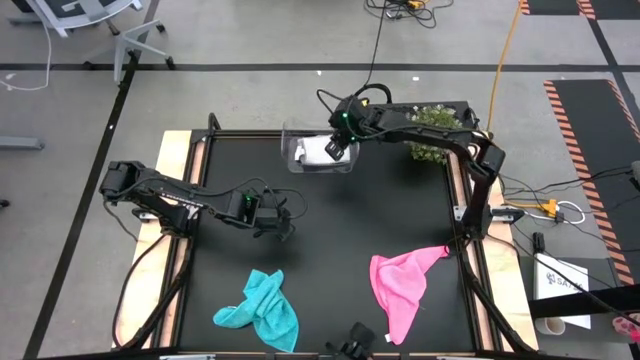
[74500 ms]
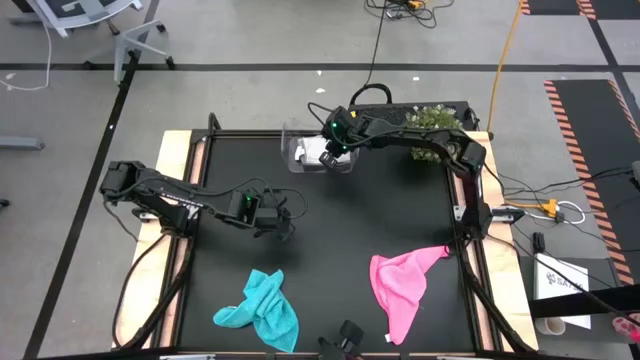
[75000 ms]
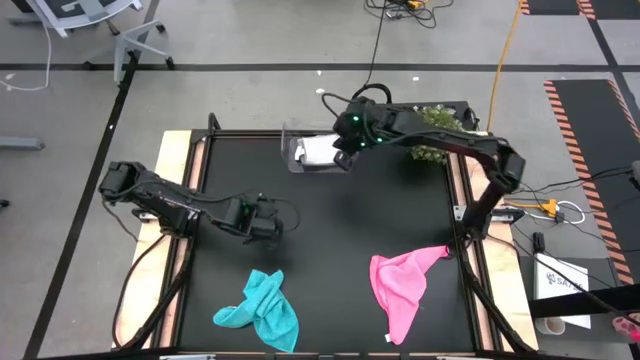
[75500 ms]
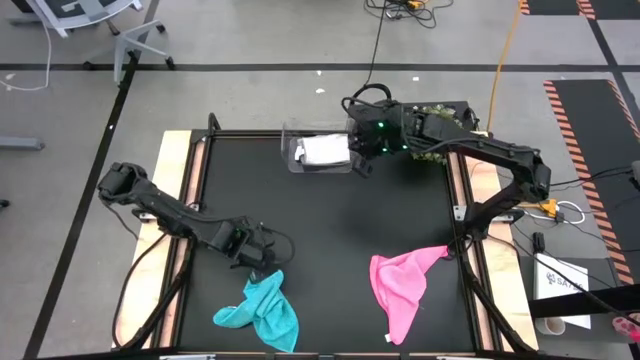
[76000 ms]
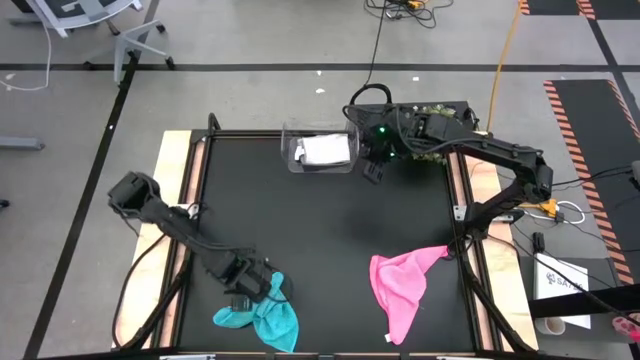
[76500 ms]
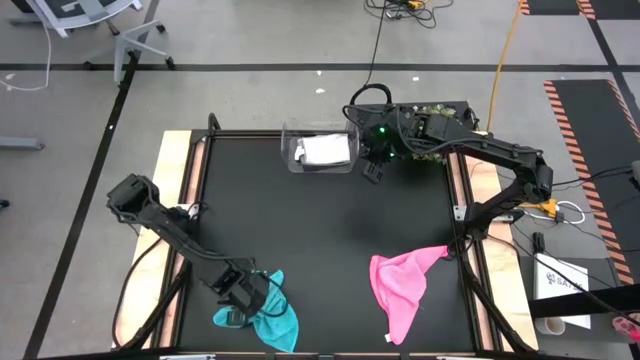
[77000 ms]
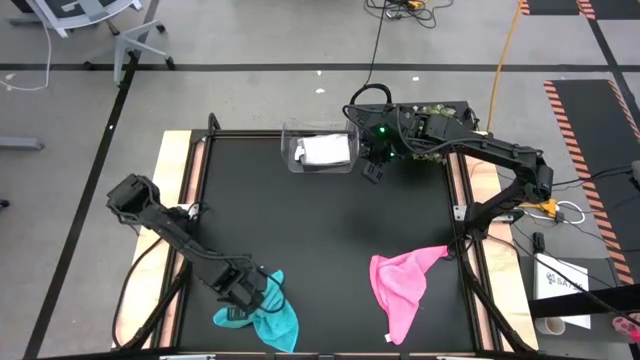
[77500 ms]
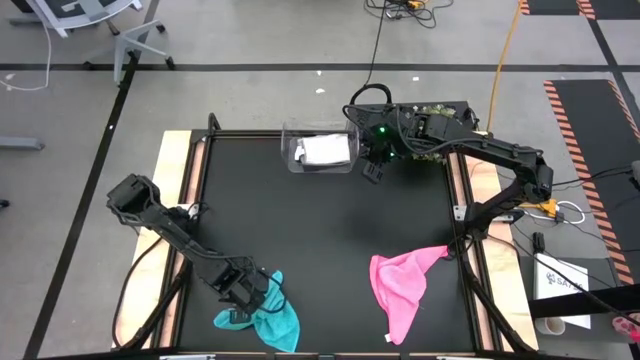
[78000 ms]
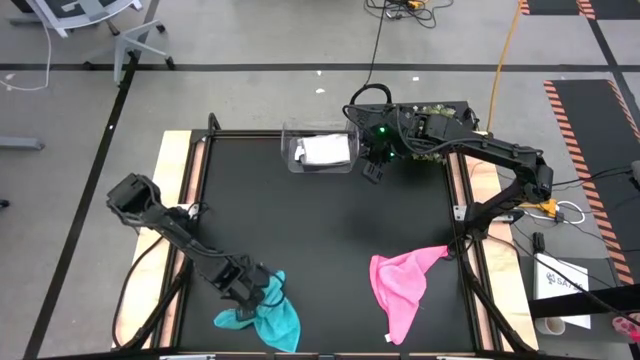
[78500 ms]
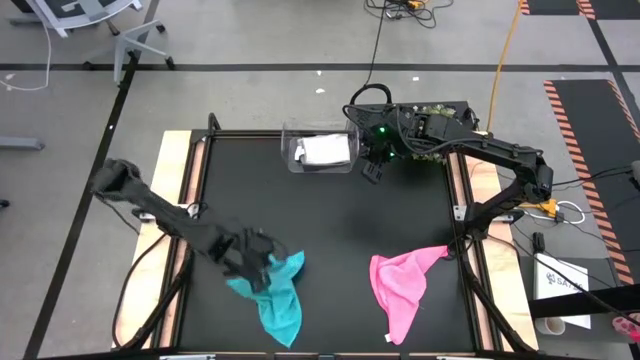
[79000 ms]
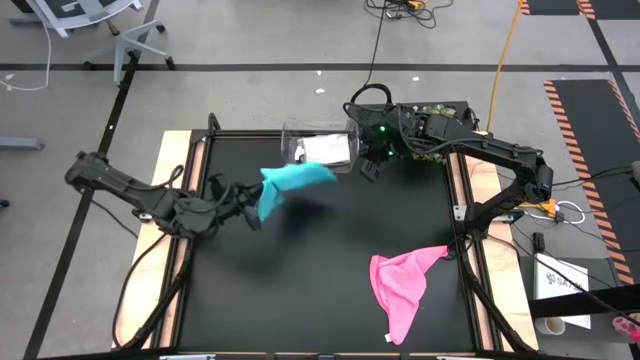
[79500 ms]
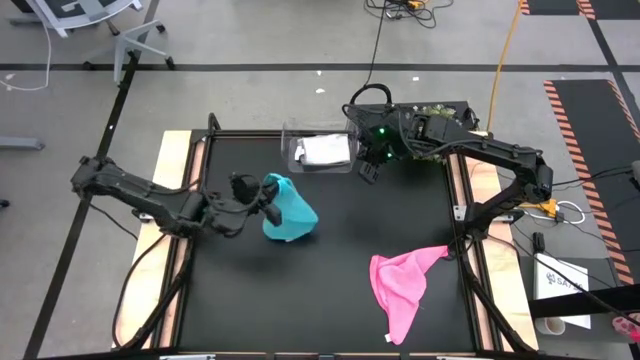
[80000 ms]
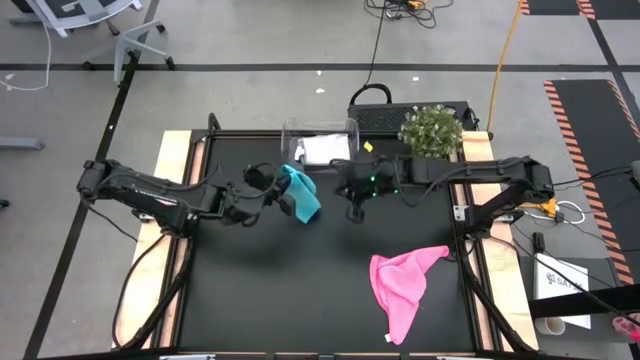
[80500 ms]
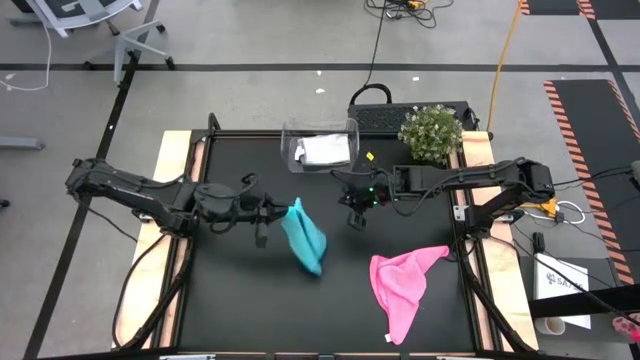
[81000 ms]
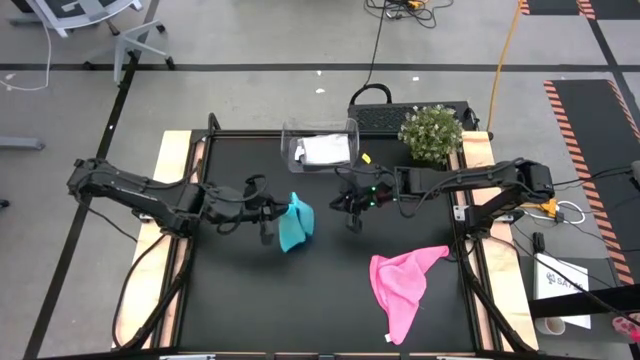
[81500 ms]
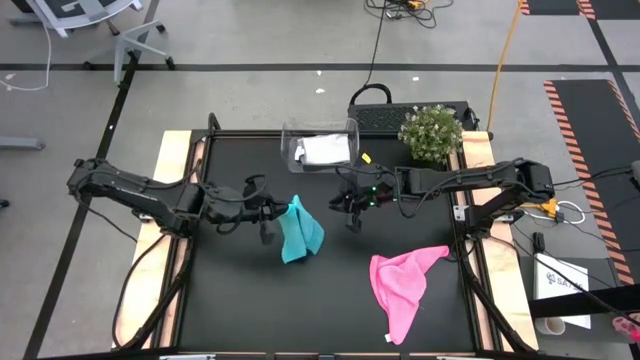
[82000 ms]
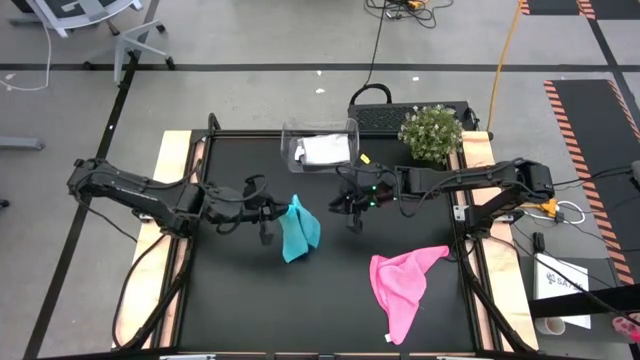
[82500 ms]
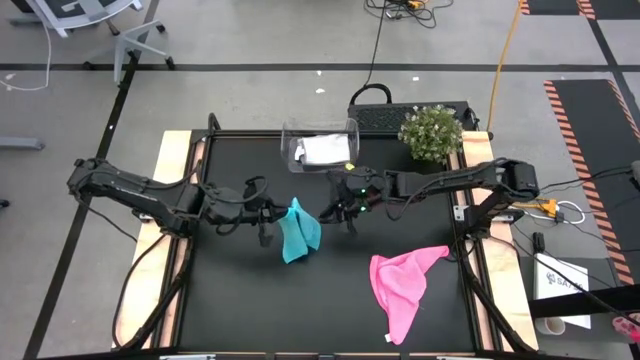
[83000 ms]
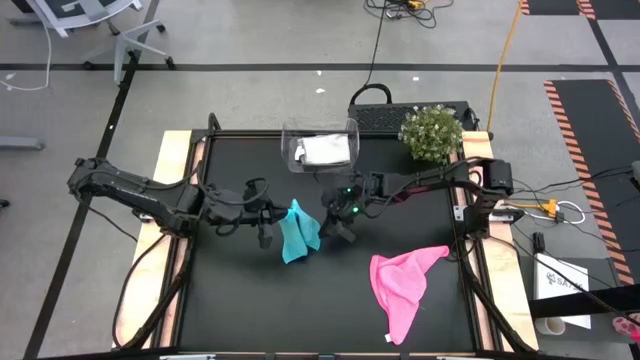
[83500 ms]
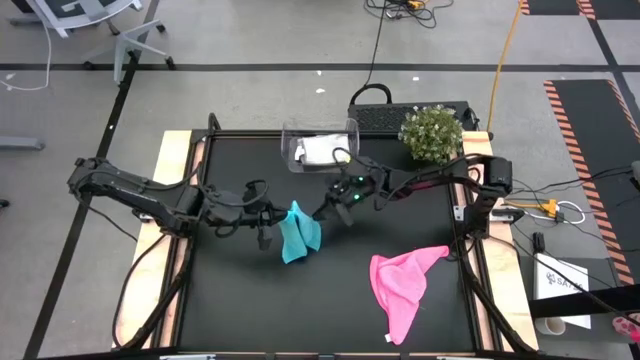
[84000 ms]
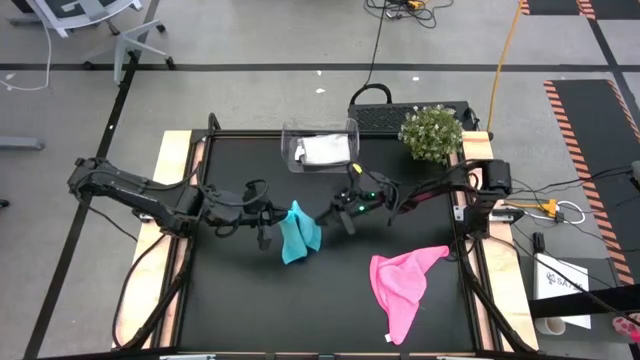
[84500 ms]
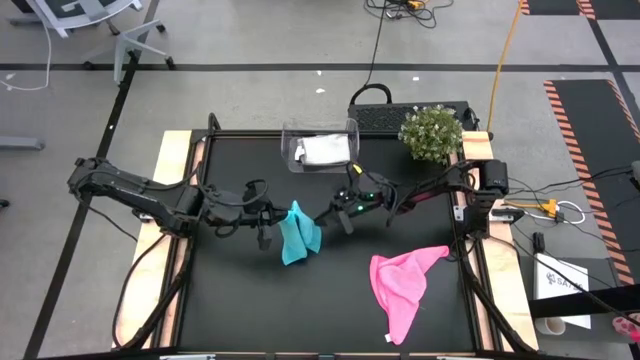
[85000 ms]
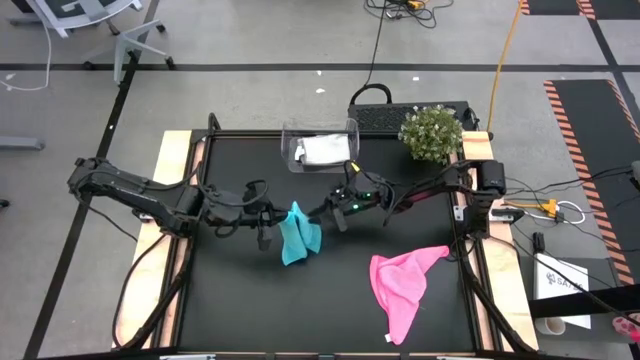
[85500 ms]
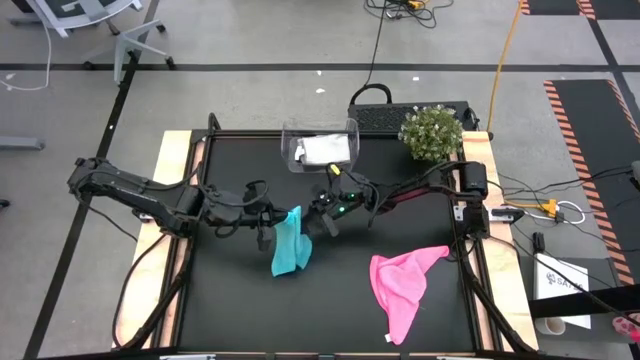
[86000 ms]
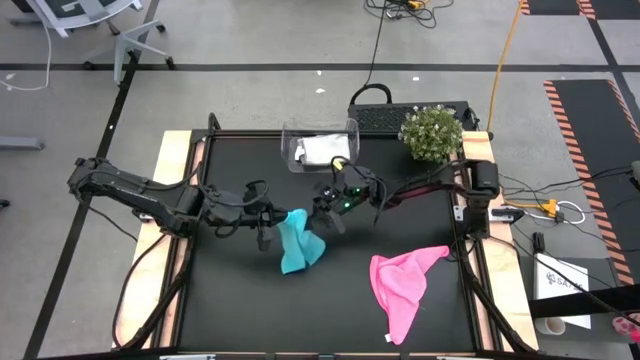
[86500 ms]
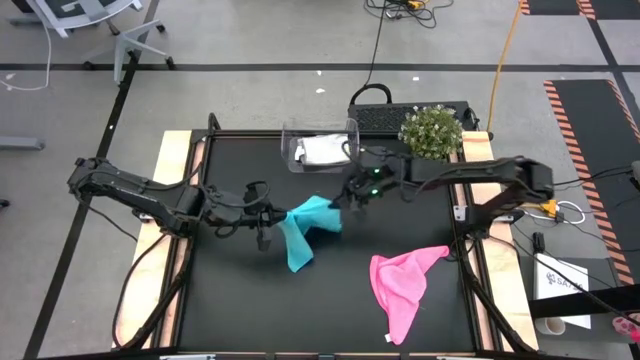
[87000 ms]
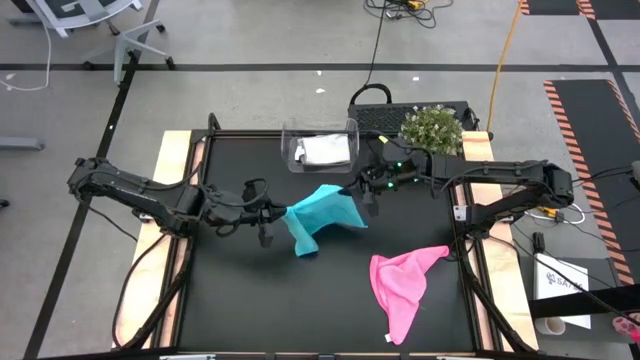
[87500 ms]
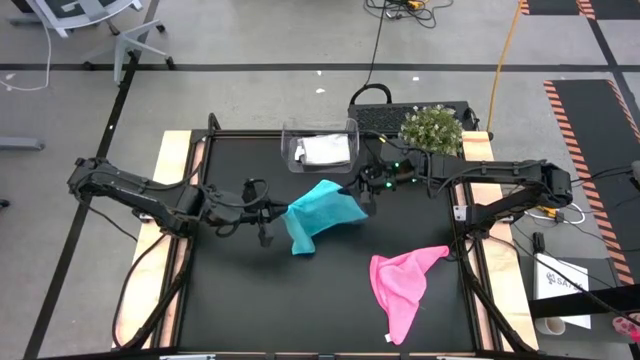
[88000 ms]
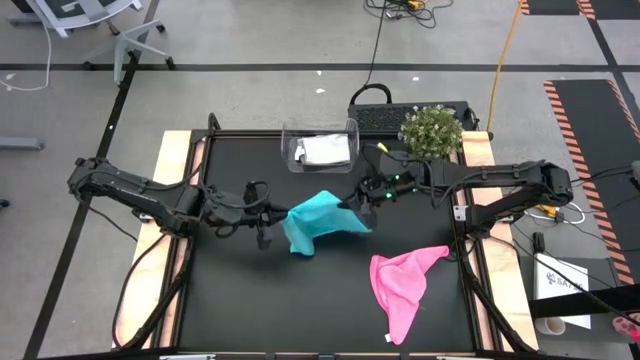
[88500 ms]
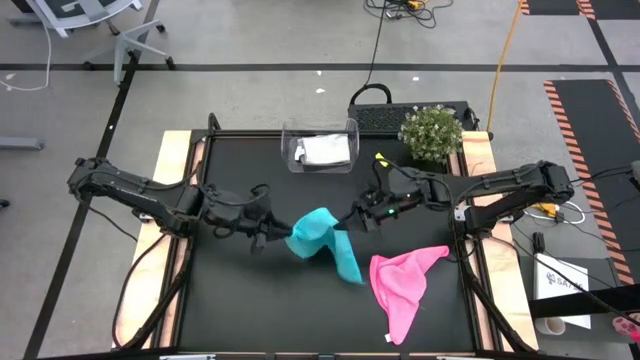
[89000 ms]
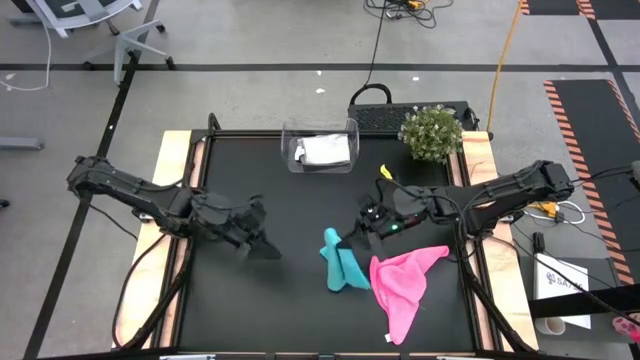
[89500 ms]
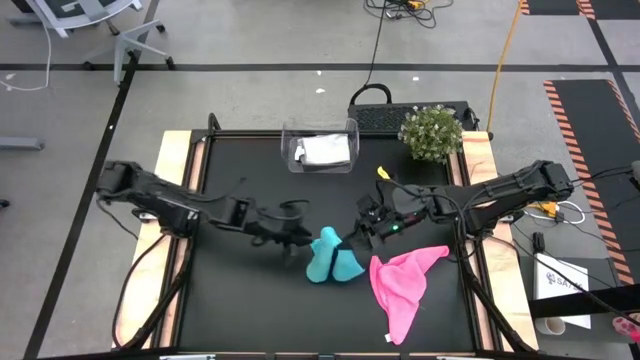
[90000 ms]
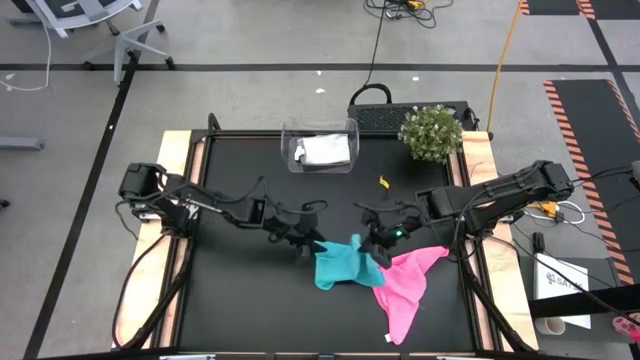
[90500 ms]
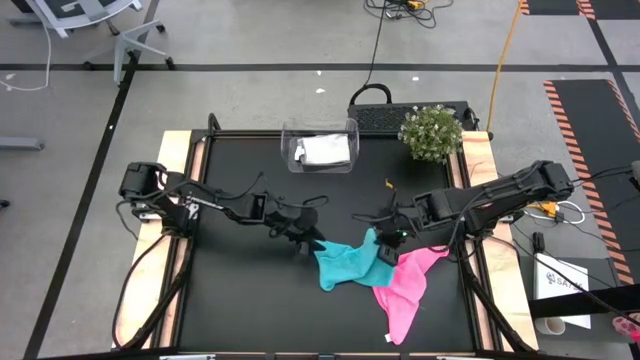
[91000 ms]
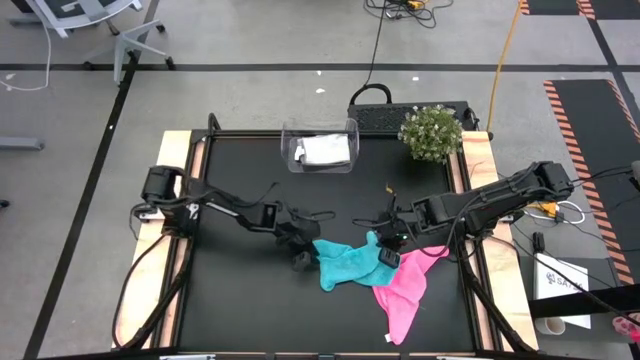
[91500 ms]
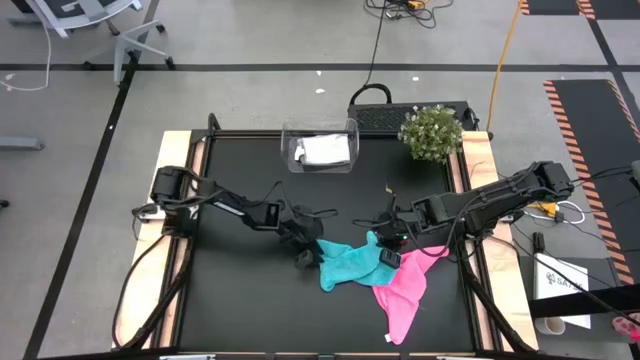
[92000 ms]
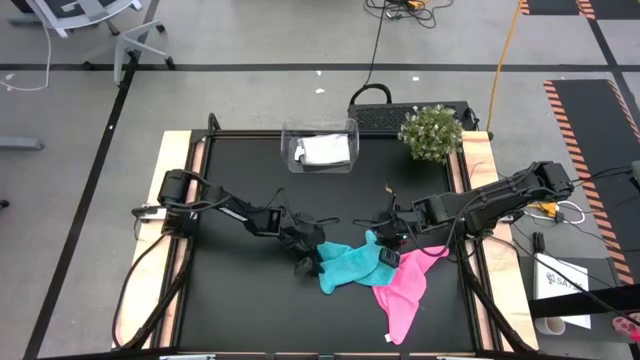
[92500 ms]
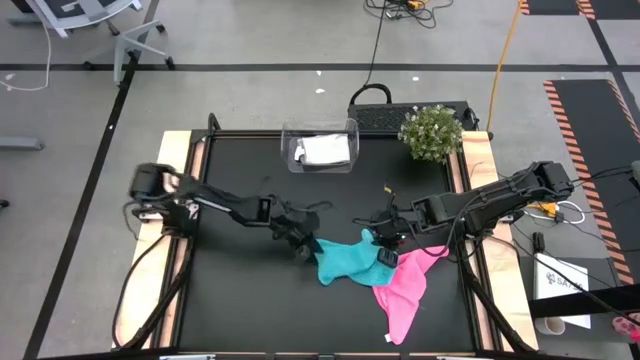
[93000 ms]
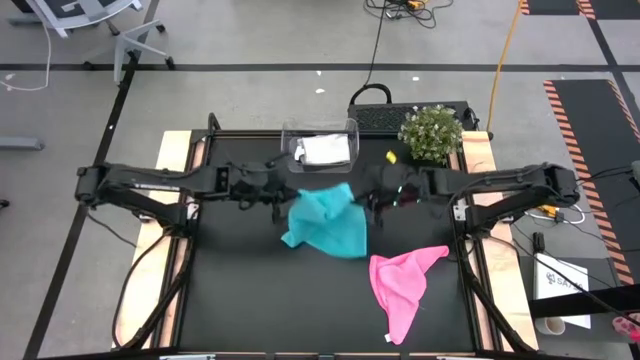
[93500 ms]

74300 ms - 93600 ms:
Task: Fold microfiber towels
Fold the light blue microfiber cloth

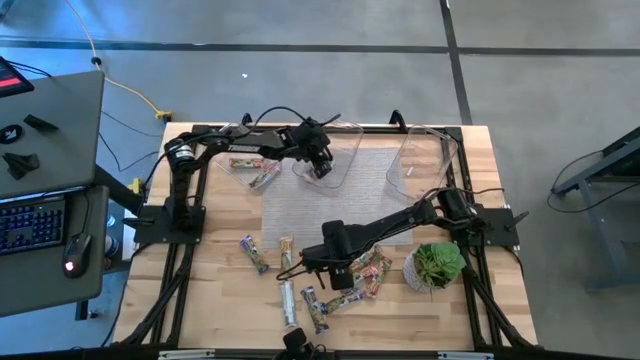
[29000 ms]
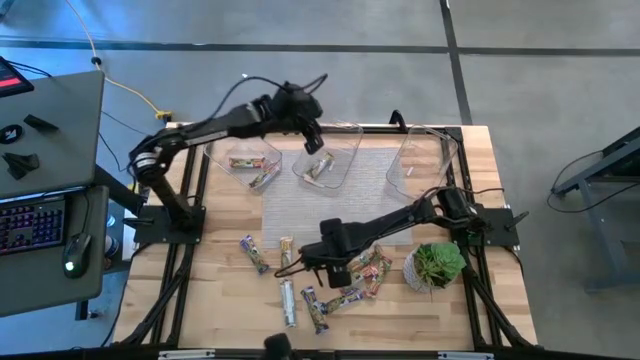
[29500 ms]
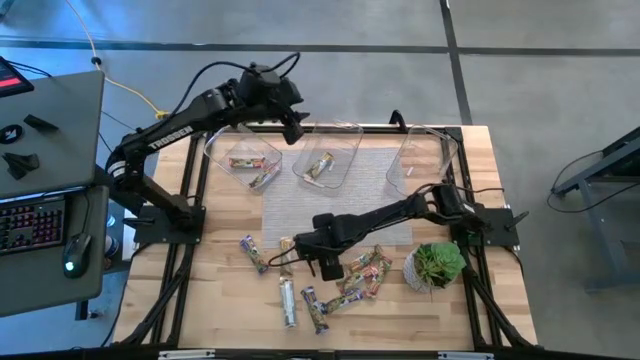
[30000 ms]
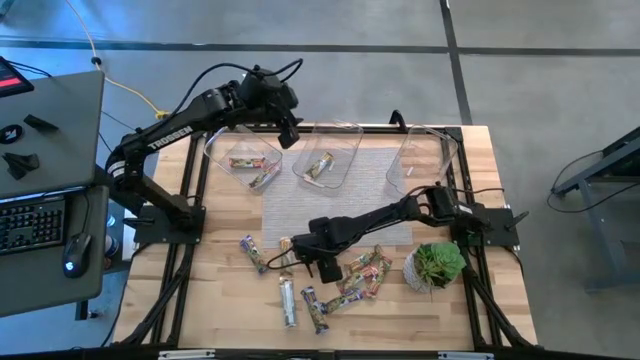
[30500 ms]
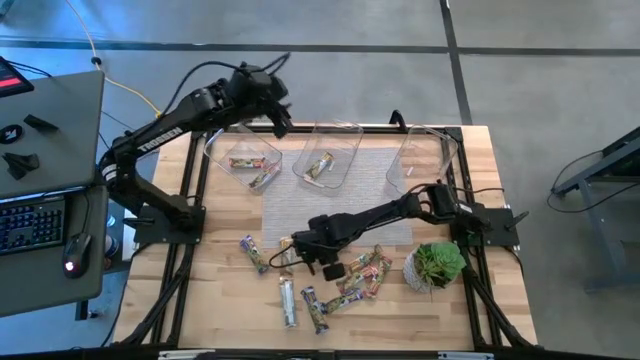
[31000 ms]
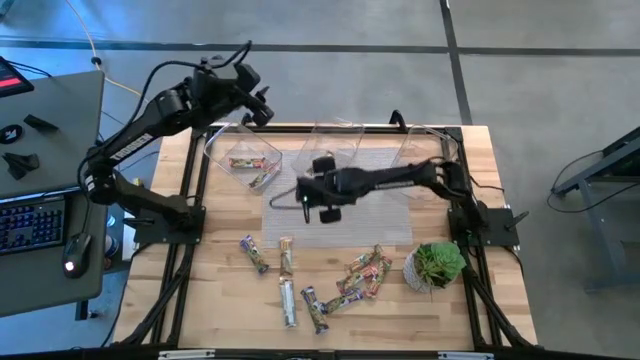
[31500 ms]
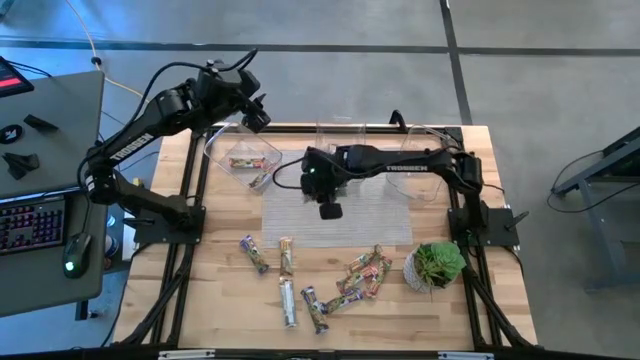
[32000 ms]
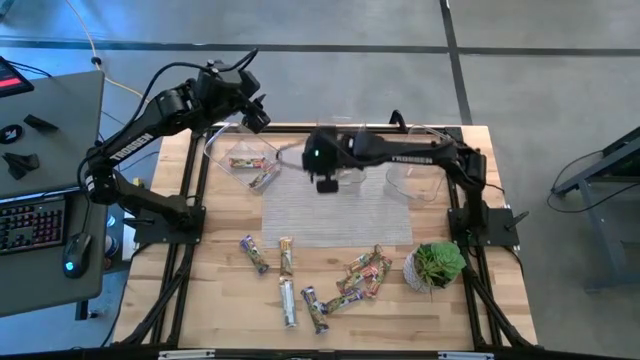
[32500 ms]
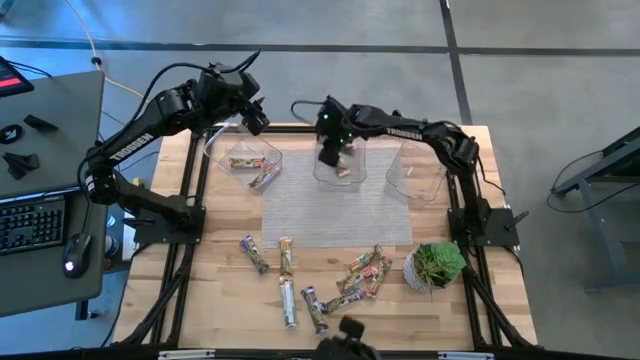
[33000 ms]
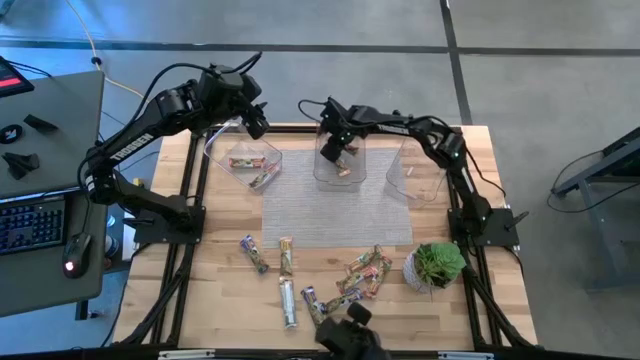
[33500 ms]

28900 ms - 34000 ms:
Task: Pick and place Granola Bars by type
Put the yellow granola bar into the middle transparent bin
